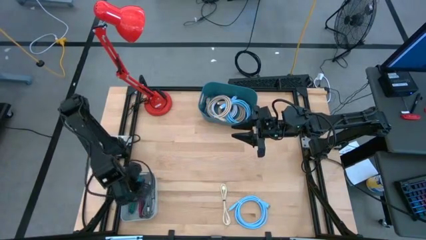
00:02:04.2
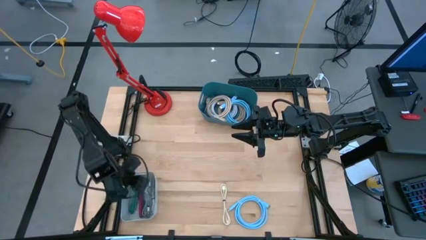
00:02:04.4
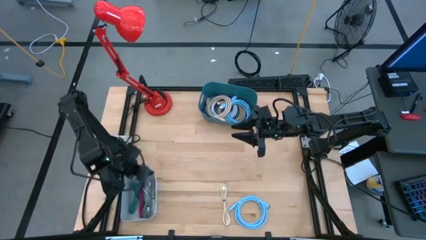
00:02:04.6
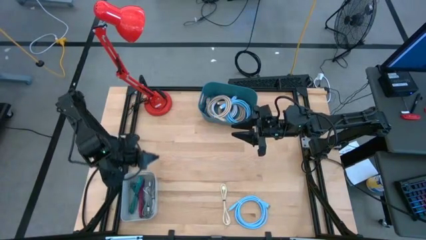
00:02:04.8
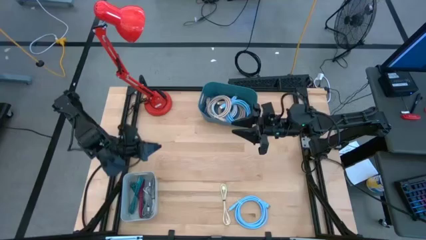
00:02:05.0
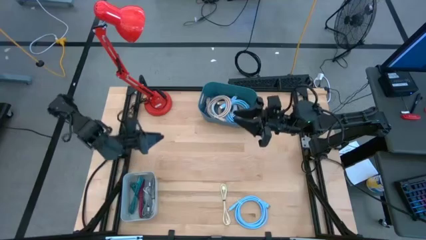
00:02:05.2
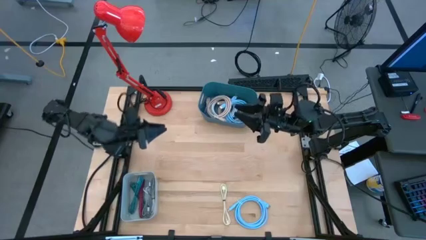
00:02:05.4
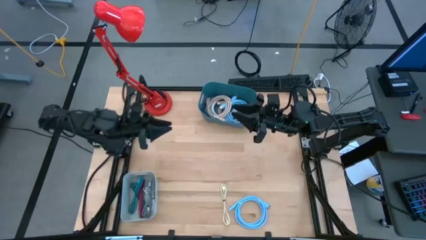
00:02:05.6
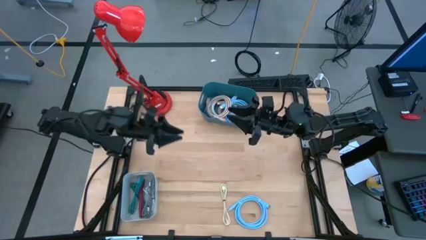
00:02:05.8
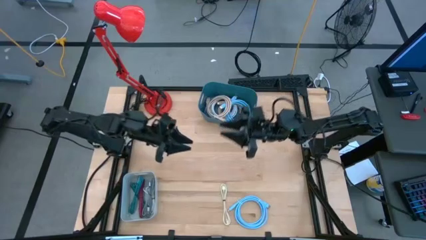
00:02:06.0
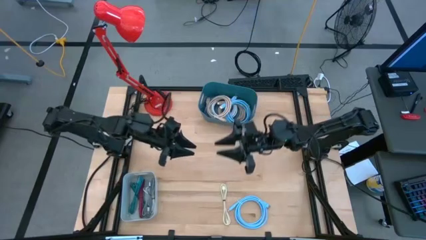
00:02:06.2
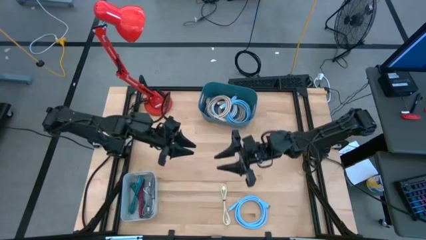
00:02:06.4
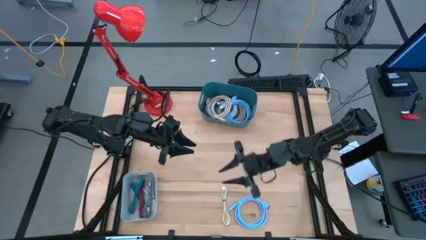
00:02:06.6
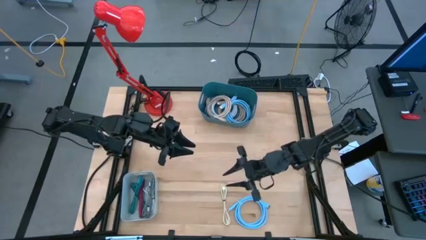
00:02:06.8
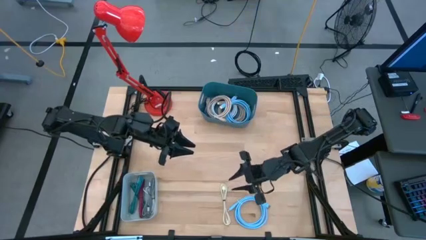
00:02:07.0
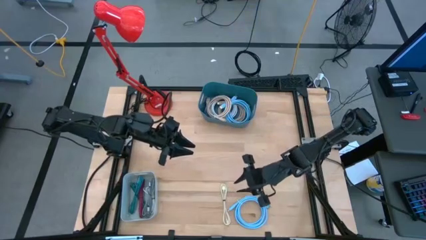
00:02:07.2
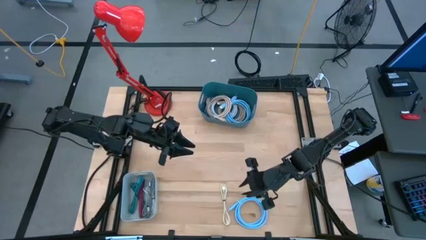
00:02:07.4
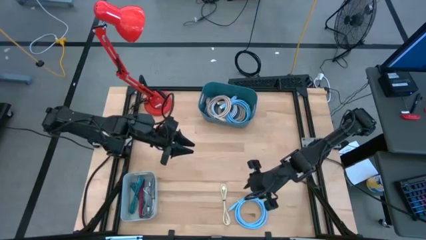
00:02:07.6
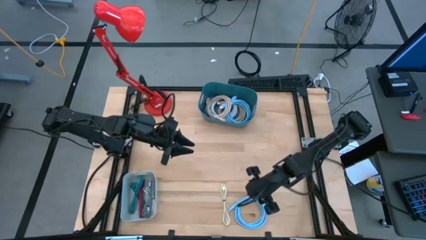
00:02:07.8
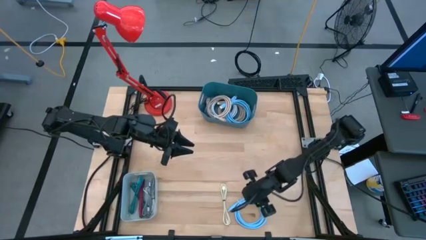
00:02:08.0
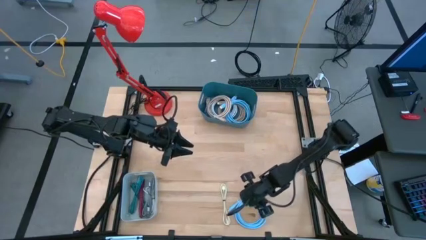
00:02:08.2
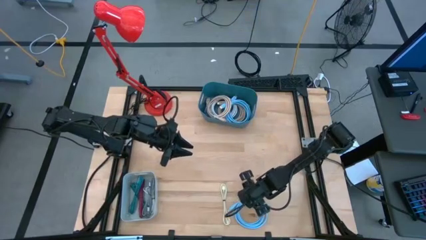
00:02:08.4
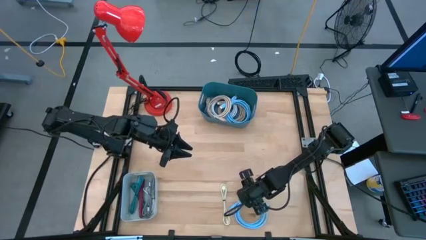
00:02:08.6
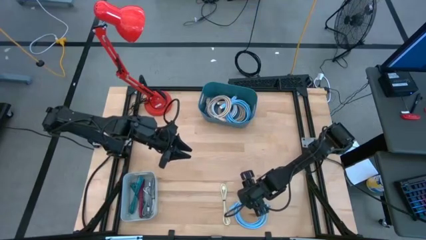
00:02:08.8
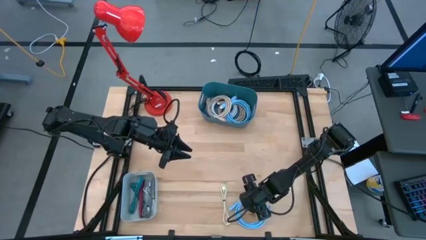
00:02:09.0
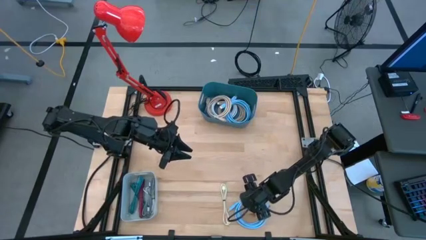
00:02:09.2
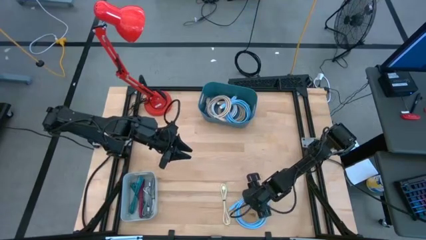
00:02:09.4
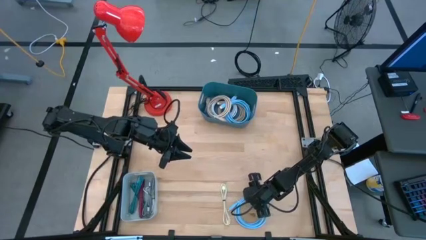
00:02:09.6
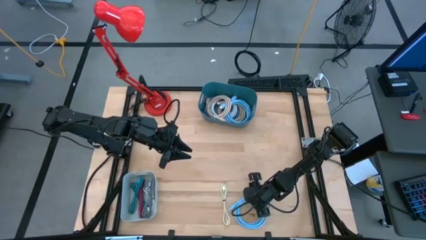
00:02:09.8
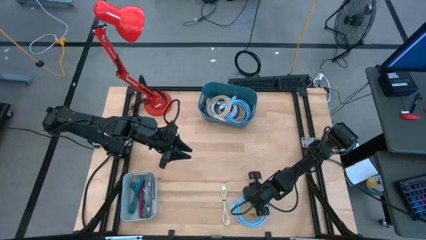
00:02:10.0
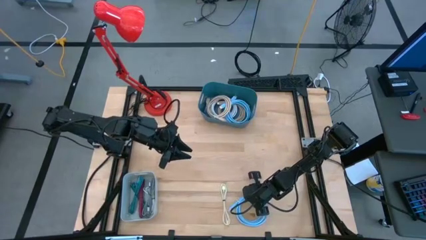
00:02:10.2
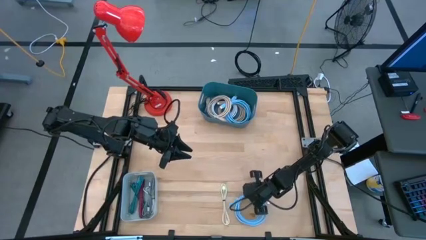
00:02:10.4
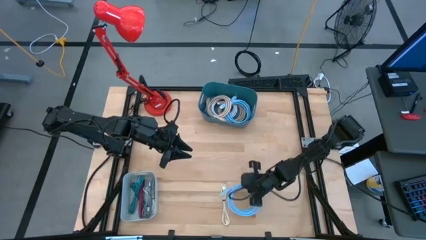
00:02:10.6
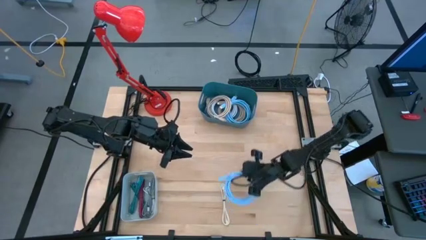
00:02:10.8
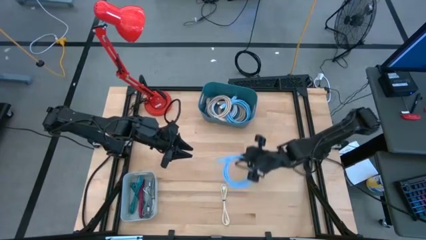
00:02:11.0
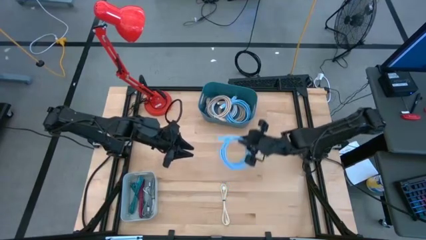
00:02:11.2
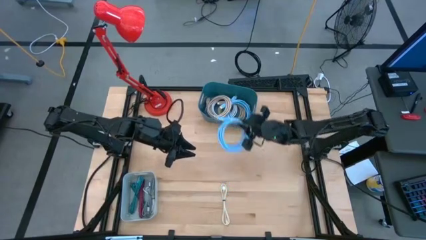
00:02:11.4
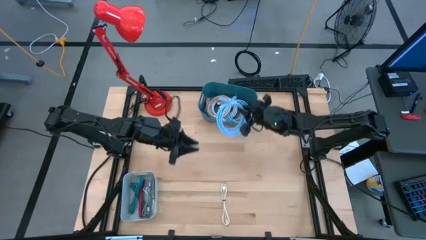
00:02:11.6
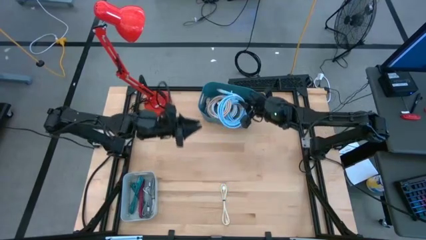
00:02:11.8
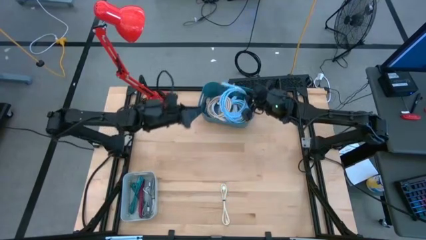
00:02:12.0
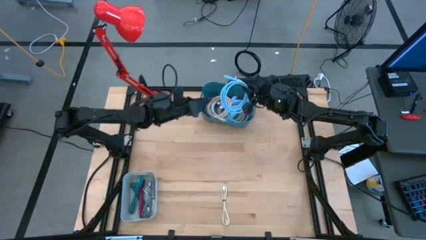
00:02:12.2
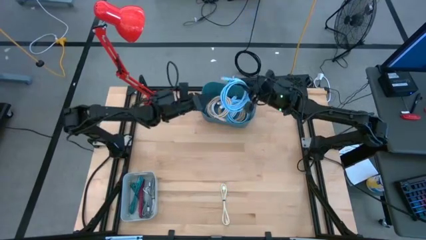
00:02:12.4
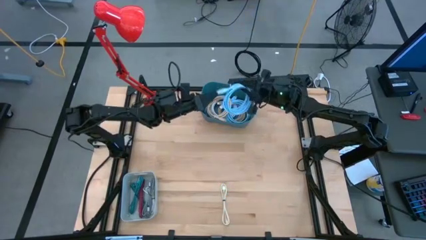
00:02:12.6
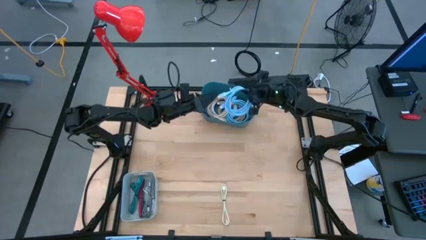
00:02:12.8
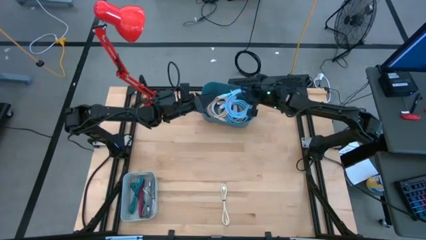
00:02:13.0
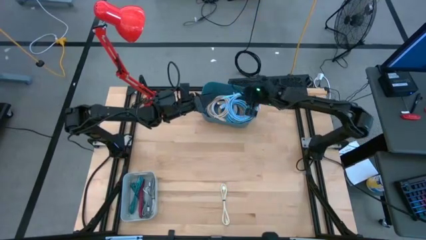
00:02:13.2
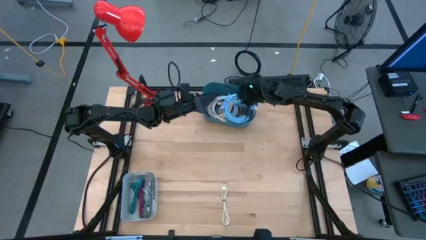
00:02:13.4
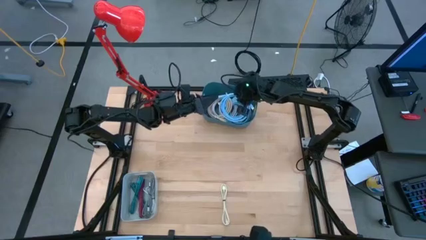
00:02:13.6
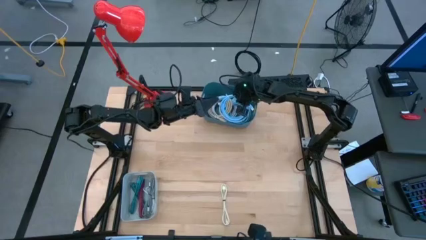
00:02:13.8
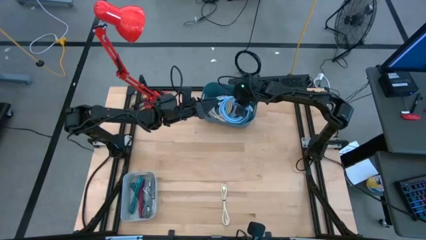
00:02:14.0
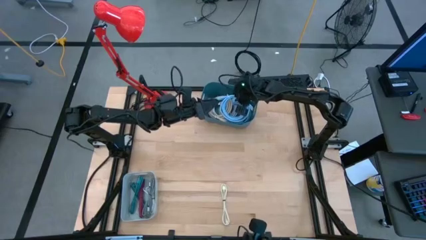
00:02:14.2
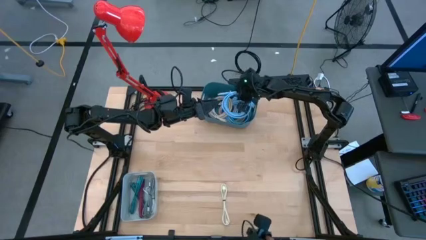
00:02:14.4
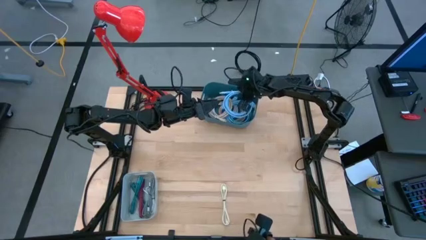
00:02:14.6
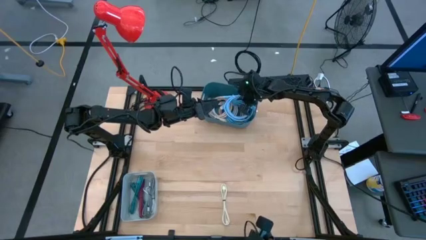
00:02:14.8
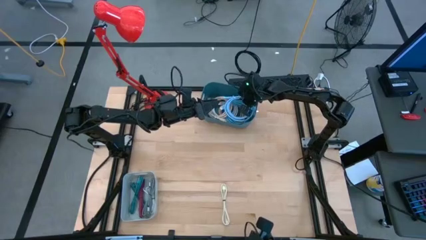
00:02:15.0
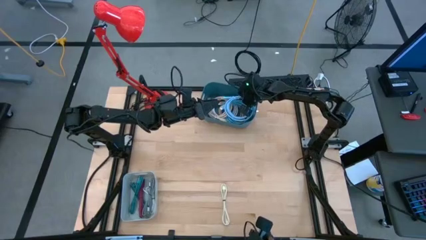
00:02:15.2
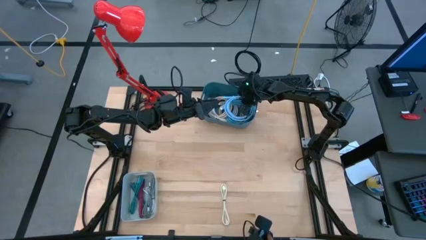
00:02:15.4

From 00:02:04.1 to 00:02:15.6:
Task: Pick & Place USB Port
Put the light blue wire cable into the blue bin

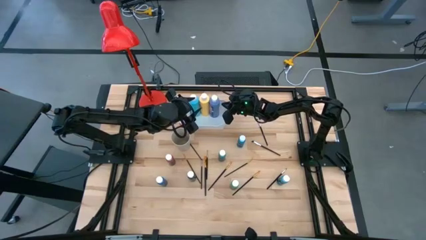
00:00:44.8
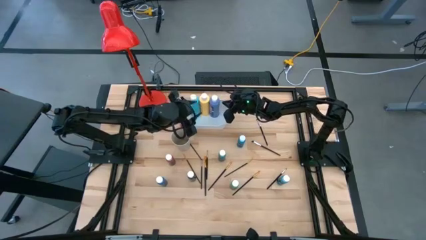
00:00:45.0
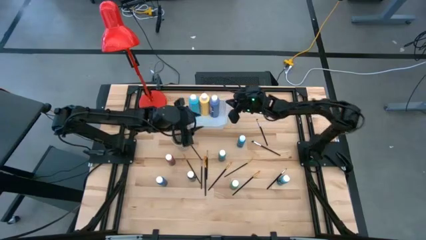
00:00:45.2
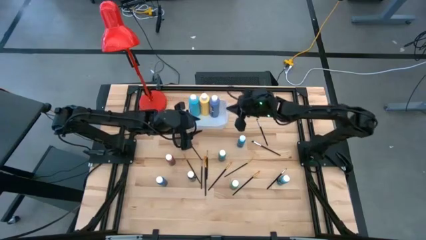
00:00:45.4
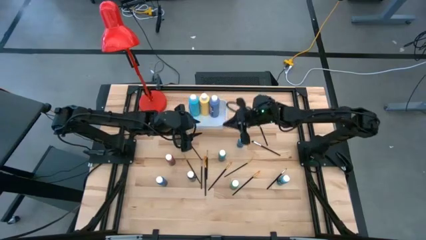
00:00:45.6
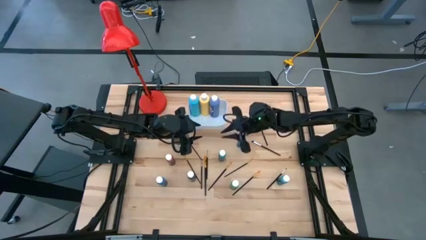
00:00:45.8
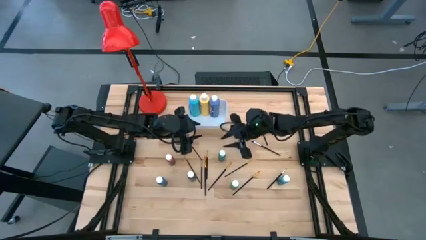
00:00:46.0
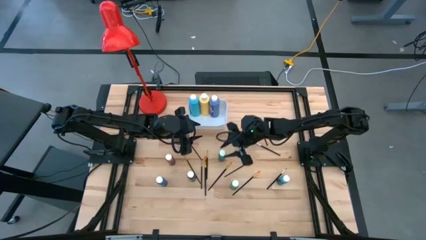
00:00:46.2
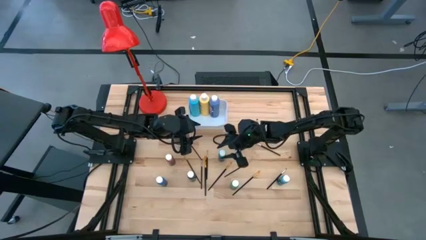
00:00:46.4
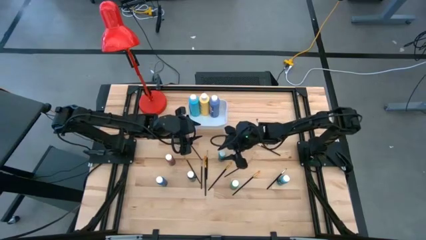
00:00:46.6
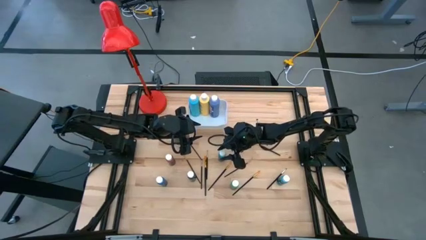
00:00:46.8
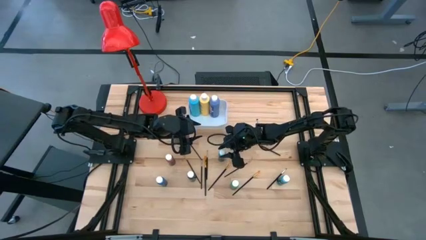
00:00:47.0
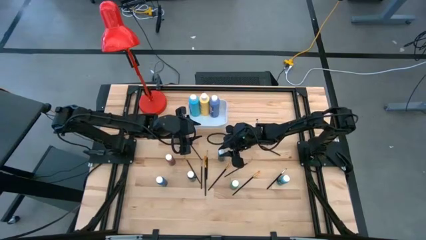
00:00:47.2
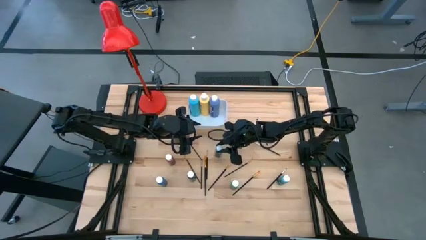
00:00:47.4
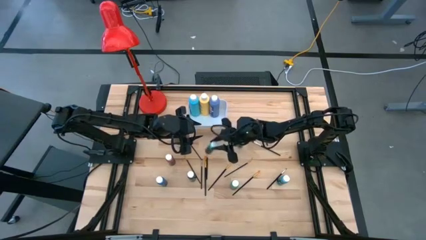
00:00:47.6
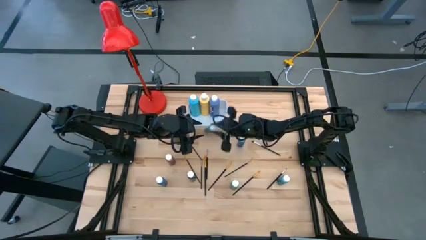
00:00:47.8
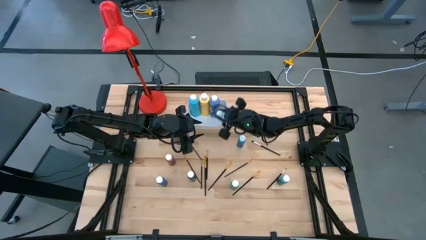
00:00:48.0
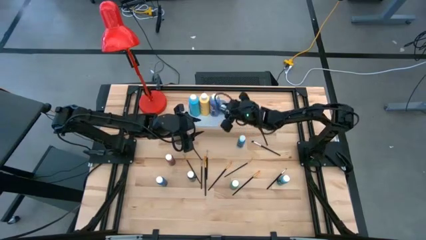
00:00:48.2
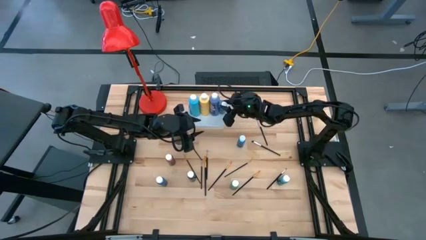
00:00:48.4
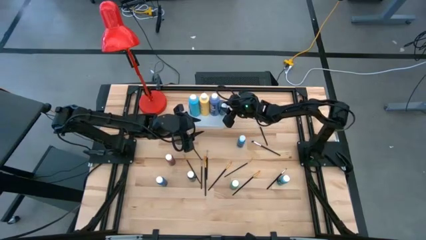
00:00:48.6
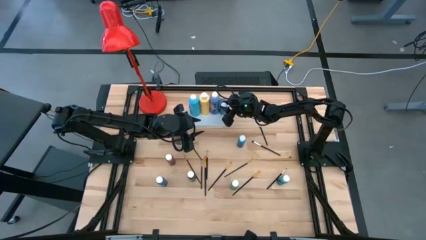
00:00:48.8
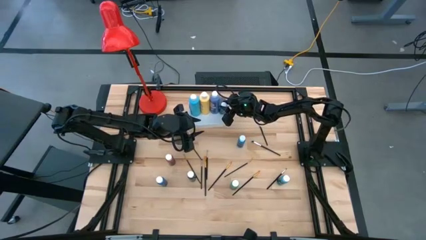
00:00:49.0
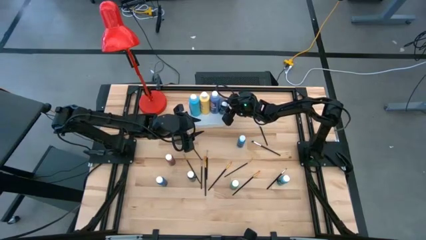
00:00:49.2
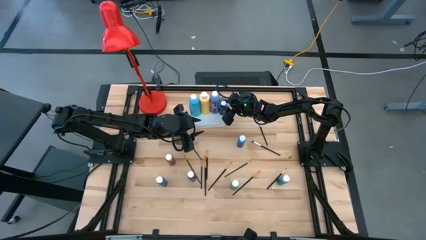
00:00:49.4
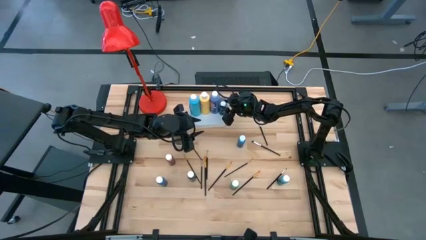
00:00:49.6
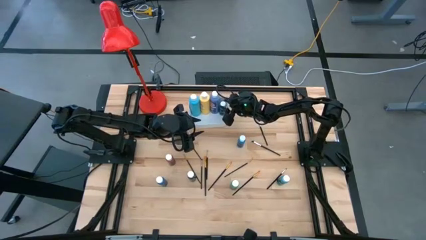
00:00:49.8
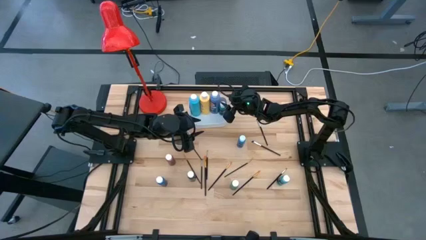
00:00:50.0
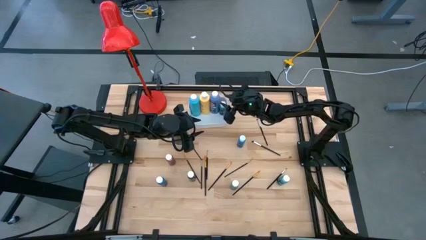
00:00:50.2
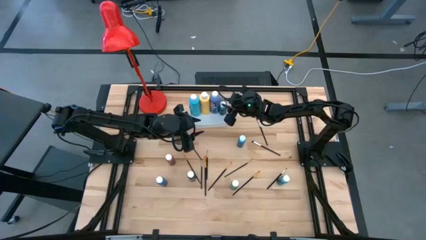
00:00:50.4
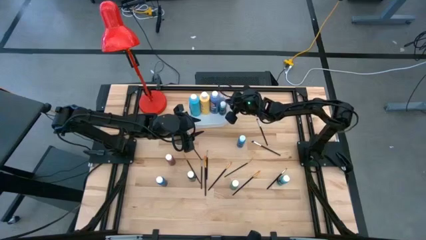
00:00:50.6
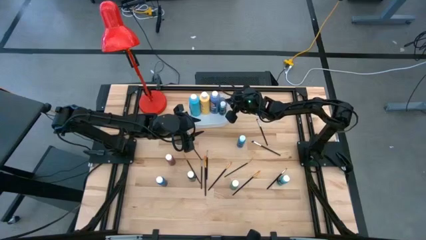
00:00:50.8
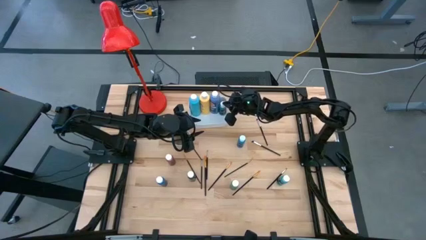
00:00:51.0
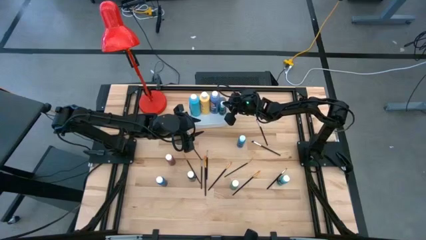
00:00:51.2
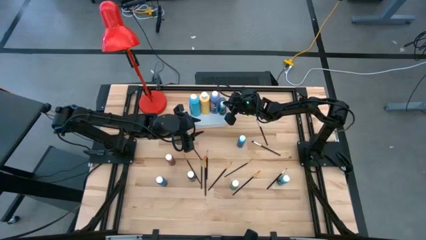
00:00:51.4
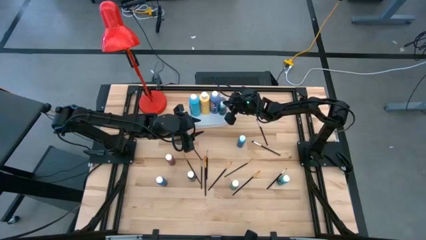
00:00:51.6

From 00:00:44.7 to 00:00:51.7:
Task: Pick & Place Paint Supplies
Put the light blue paint bottle into the white bin
